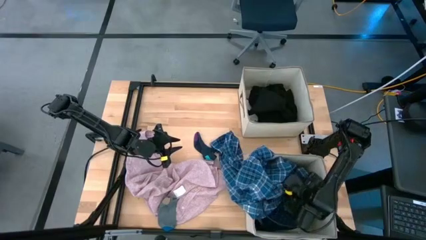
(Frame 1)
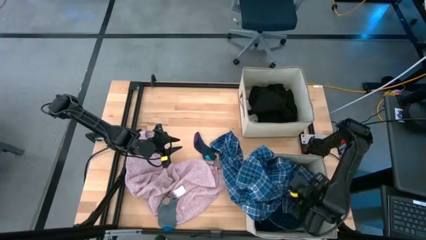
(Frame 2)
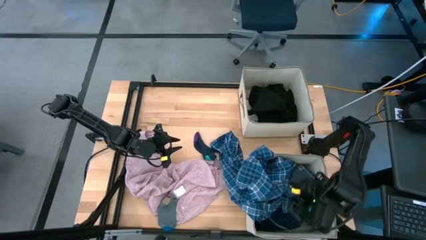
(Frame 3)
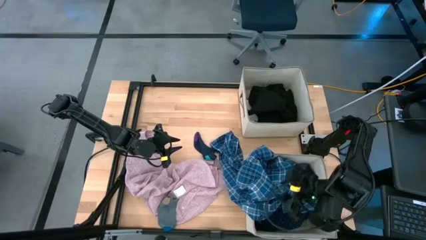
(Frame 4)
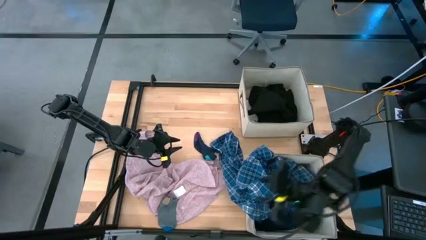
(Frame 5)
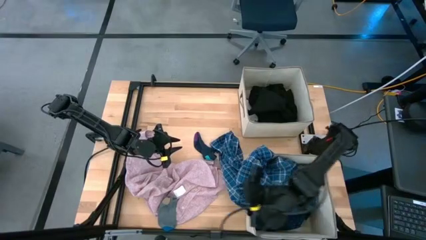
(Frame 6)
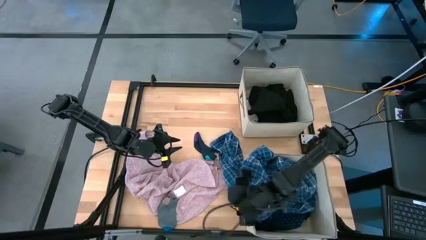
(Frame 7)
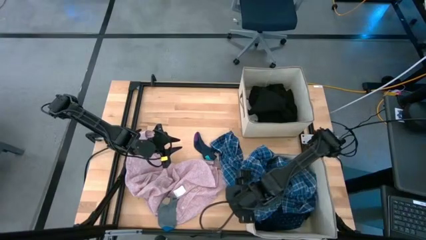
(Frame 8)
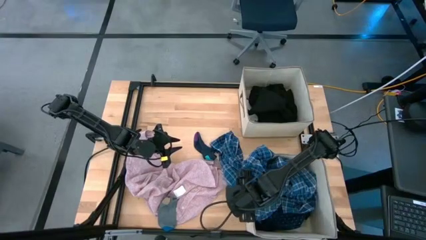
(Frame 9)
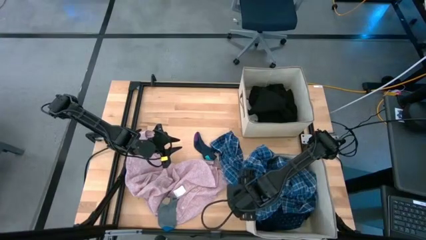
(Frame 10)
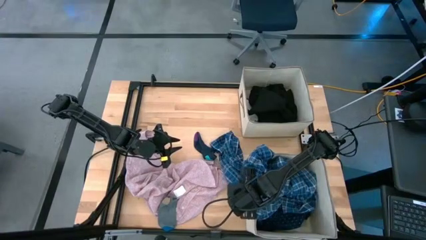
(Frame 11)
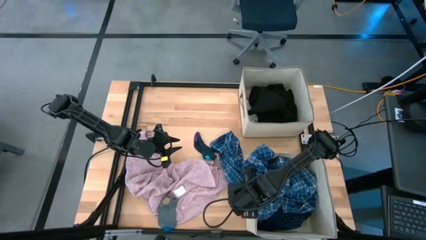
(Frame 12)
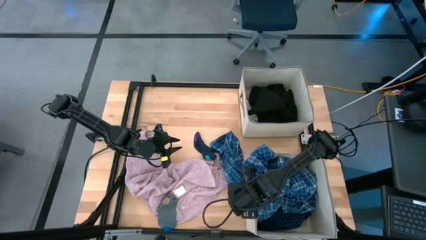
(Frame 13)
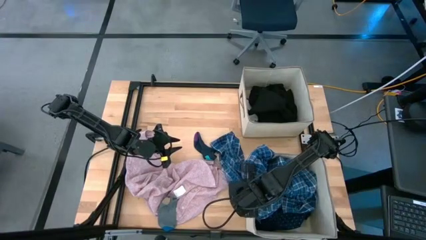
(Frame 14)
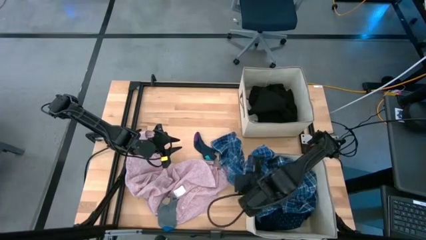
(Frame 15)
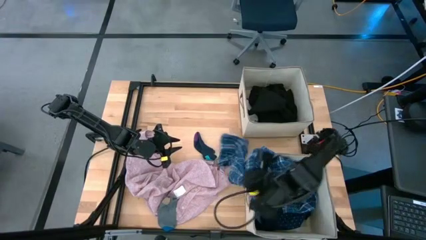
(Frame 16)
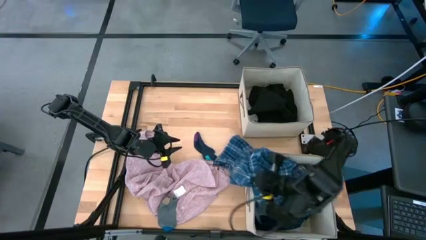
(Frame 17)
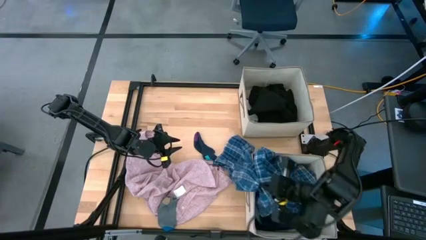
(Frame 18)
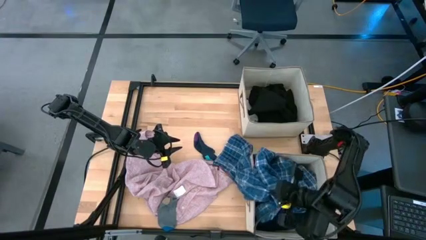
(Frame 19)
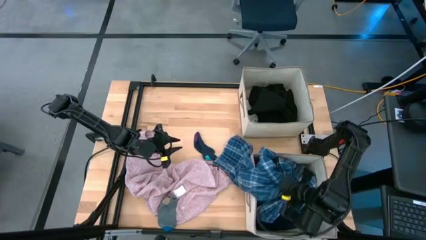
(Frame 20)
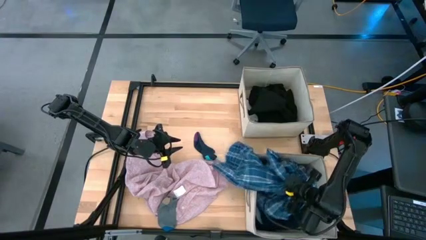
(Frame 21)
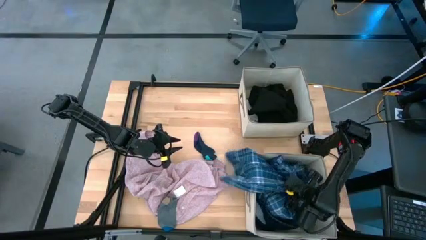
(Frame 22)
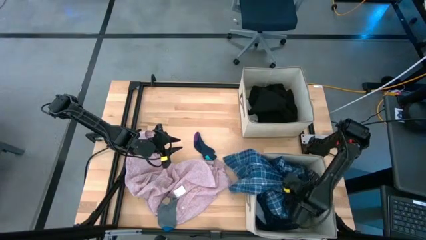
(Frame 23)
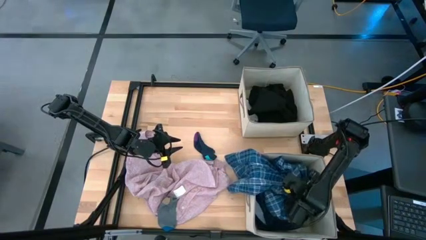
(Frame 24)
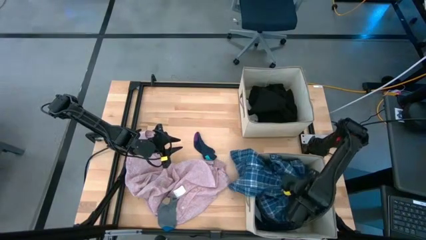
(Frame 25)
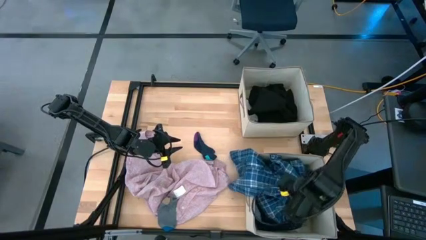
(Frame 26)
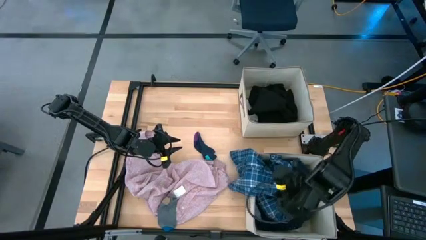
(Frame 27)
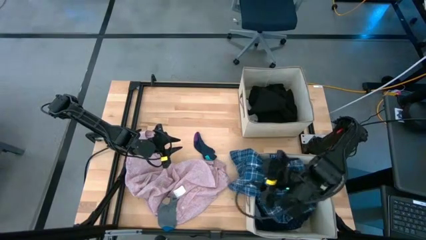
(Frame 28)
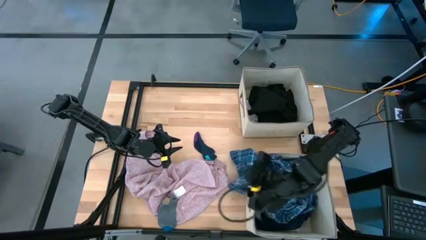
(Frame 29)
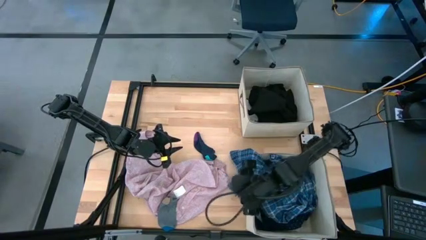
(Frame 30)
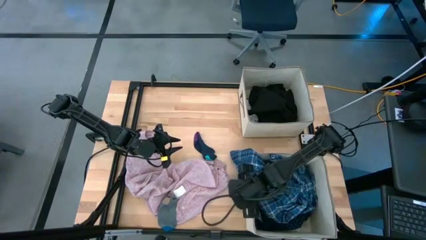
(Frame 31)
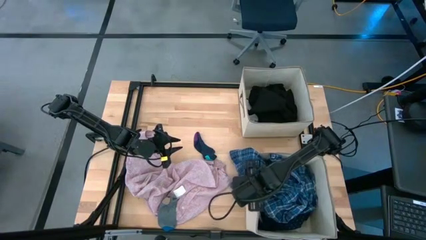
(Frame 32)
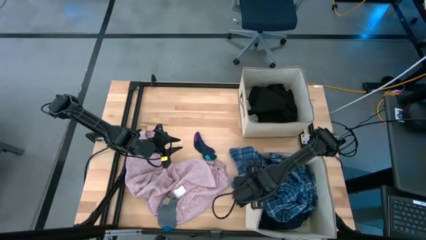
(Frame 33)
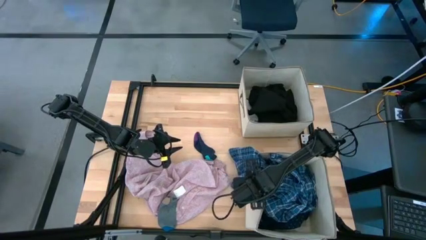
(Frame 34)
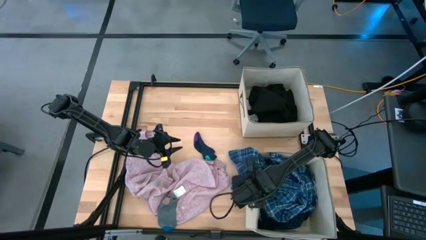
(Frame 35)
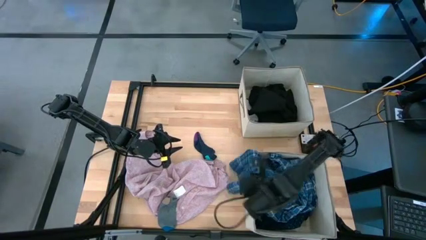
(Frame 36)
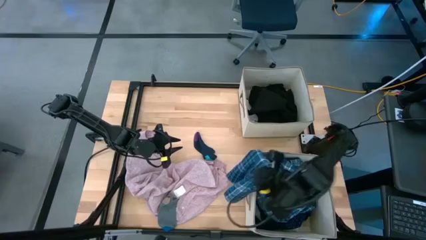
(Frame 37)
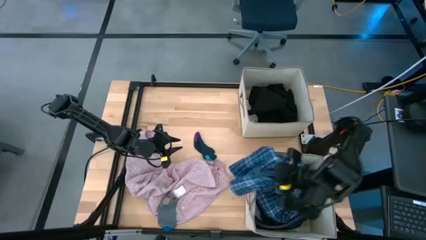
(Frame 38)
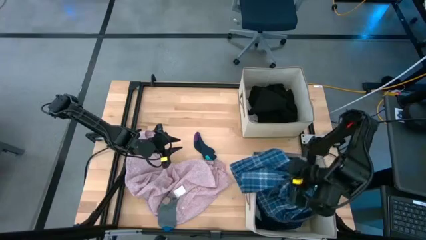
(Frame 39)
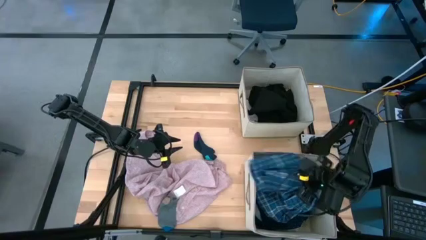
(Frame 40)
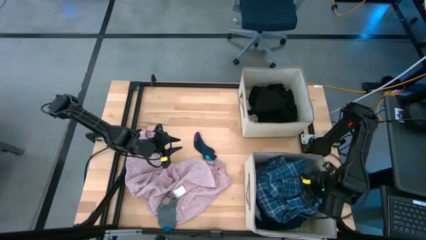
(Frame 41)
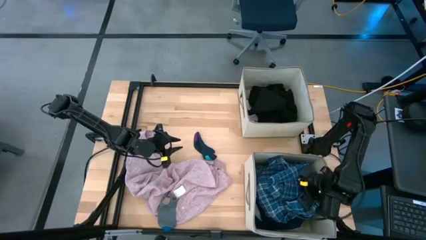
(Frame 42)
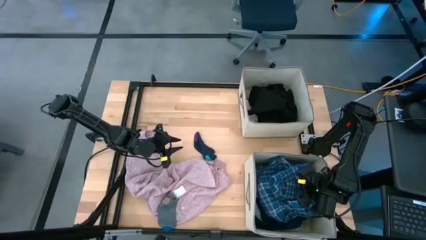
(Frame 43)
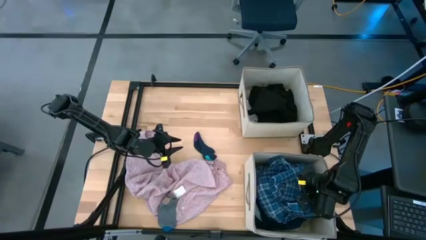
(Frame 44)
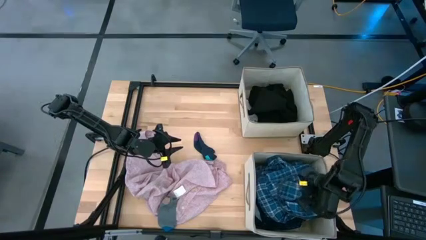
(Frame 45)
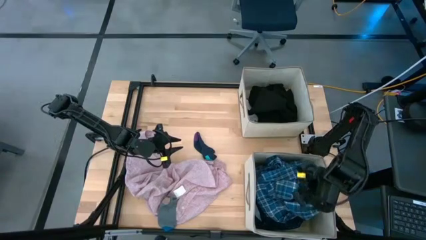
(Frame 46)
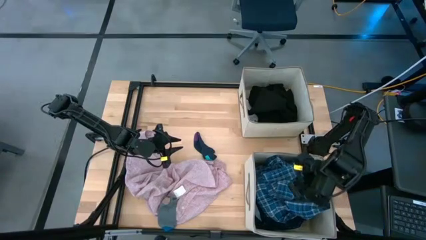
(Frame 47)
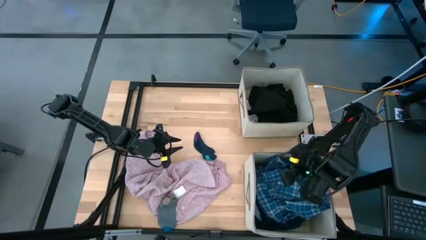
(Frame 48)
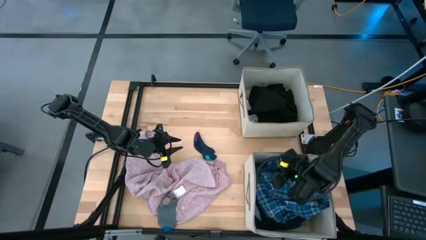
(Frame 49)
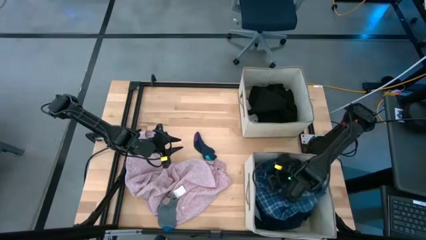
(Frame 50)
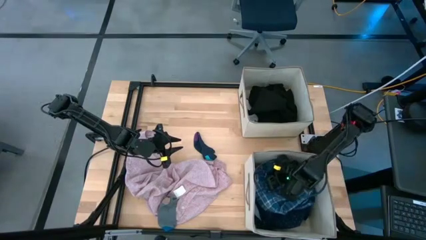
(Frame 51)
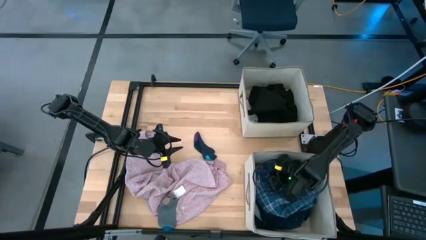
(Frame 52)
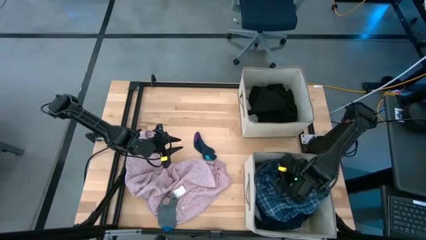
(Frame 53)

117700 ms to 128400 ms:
Task: Sort clothes
Put the blue checkered polo shirt into the bottom laundry organizer

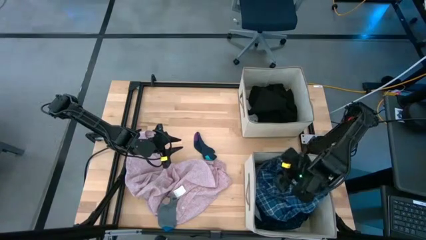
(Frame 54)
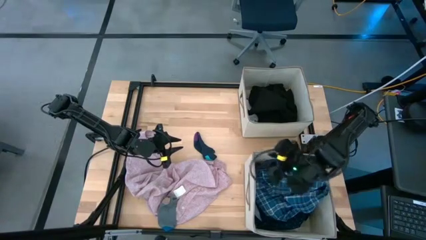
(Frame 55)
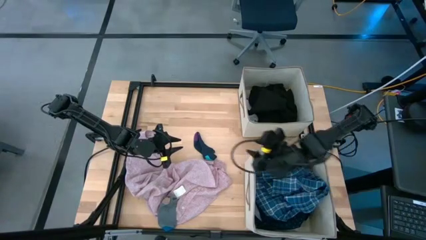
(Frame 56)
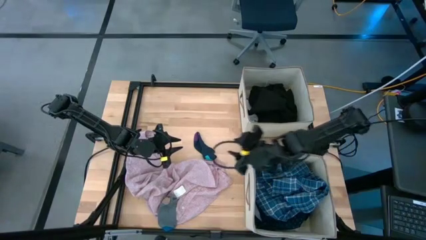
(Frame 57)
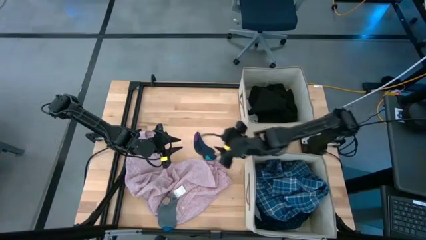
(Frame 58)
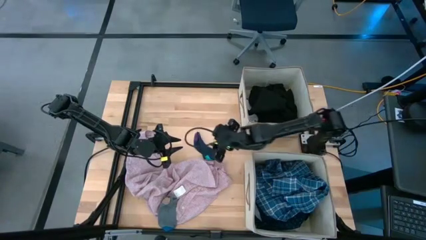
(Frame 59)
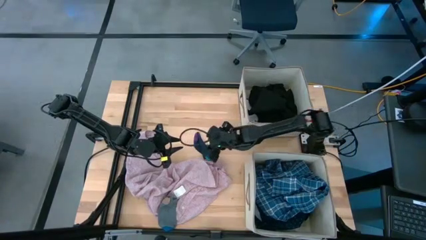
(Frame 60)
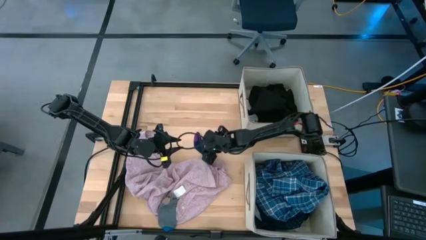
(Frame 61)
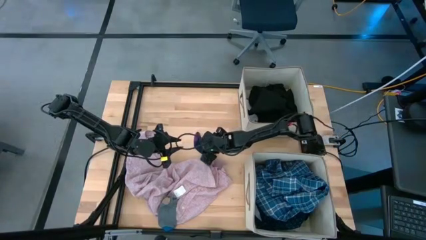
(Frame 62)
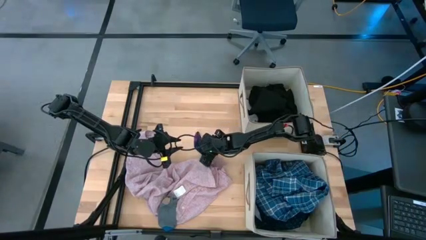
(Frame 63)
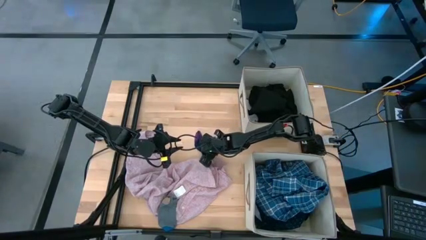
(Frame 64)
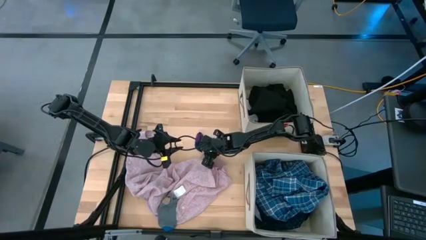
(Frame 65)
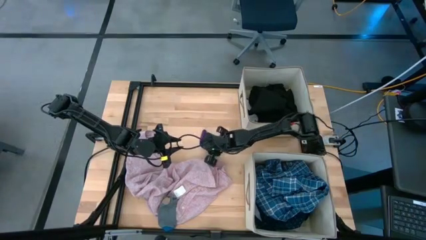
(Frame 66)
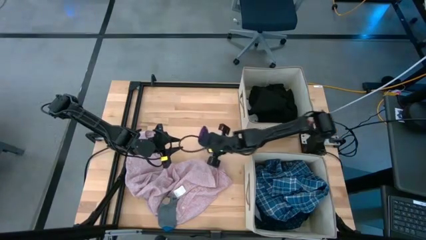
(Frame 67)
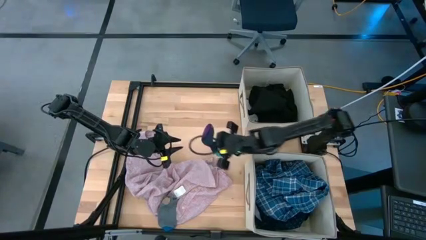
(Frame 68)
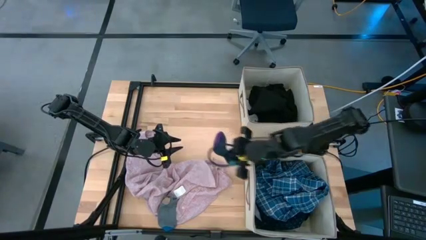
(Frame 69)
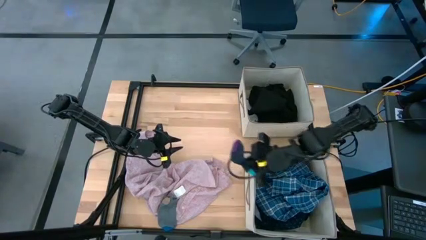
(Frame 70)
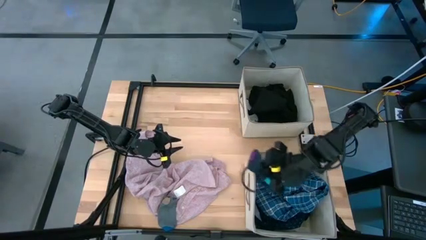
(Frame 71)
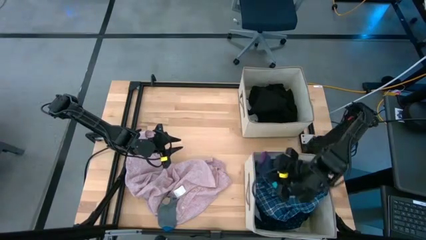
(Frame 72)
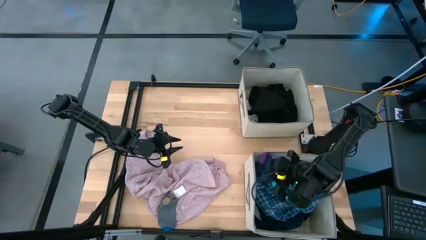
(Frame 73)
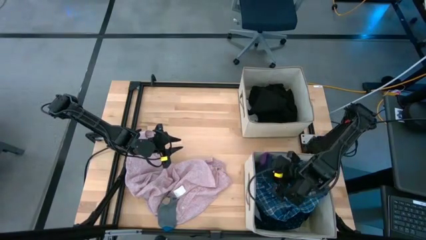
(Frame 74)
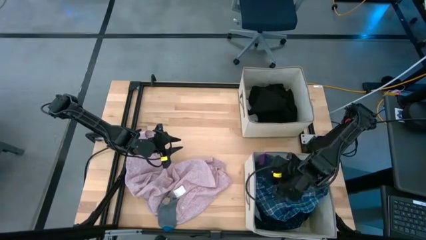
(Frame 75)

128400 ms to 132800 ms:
Put the dark blue sock into the bottom laundry organizer

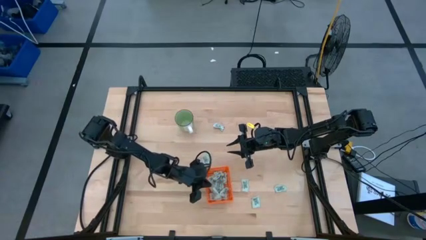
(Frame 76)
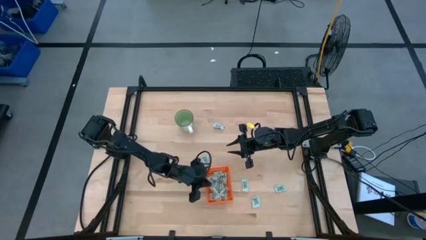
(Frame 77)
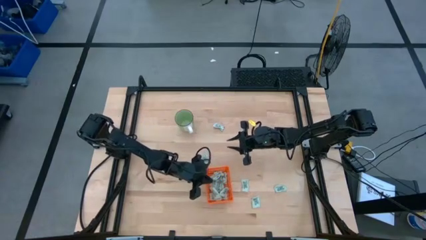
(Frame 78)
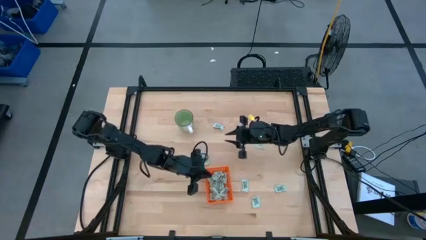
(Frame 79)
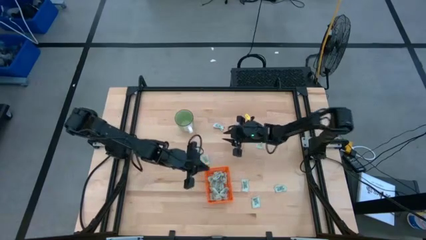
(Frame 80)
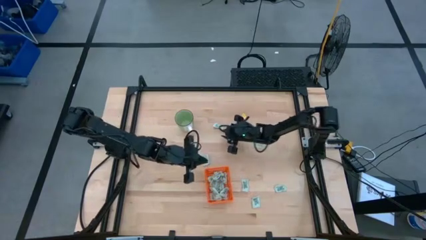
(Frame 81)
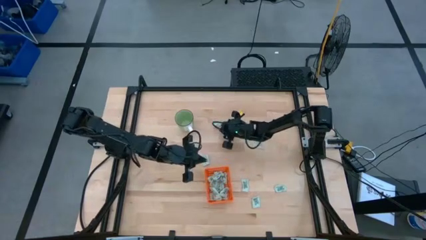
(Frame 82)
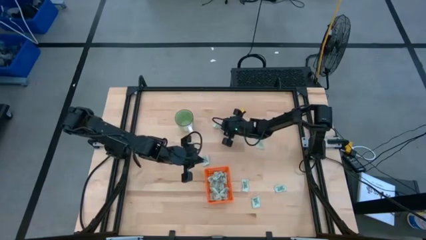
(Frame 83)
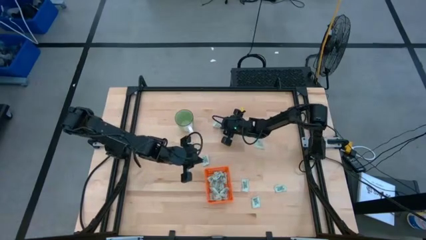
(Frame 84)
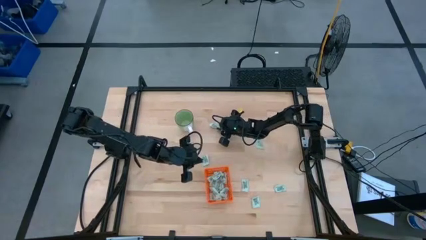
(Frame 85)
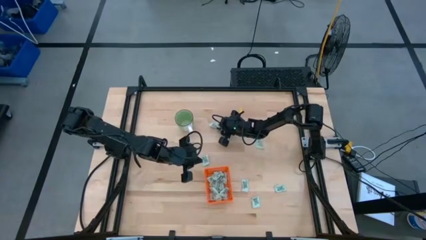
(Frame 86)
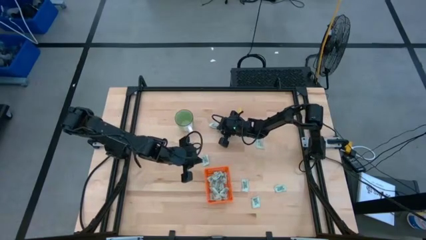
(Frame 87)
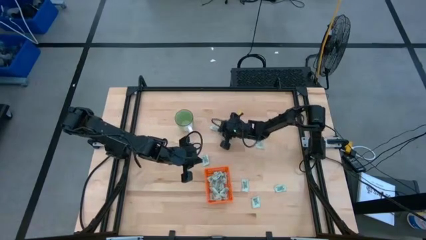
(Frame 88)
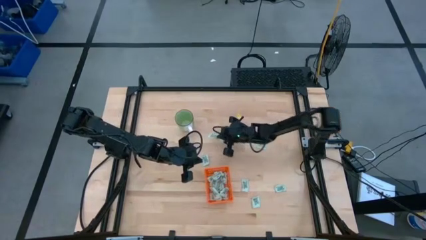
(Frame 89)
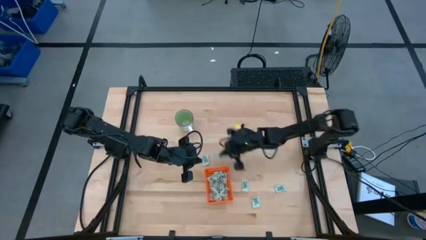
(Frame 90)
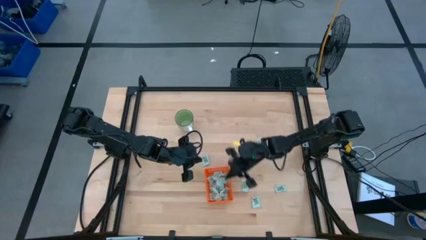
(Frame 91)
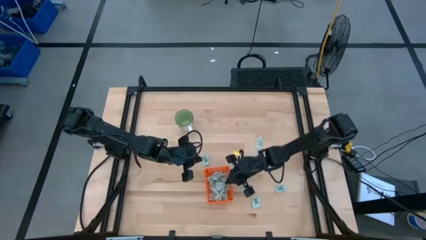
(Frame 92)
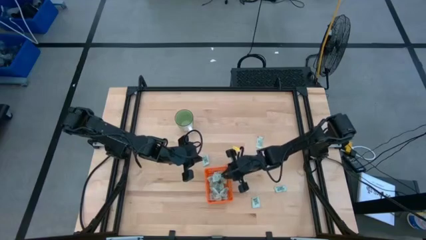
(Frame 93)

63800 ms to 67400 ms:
Task: Pick and place Stevia / Truvia into bins
Put the stevia packet into the orange basket
